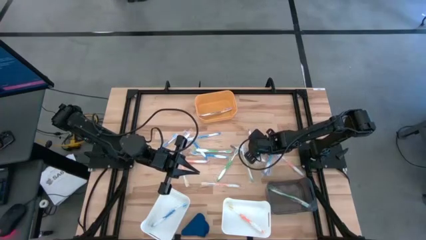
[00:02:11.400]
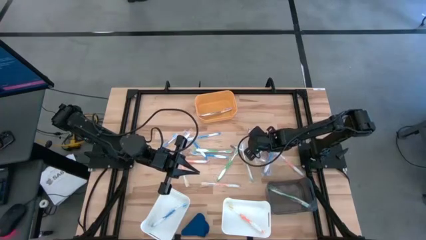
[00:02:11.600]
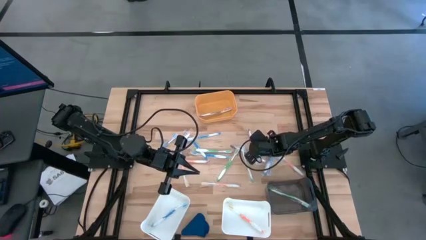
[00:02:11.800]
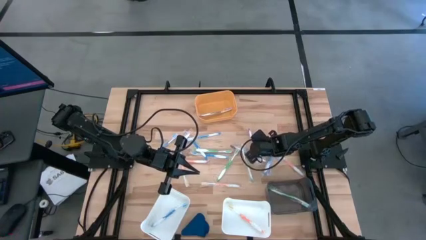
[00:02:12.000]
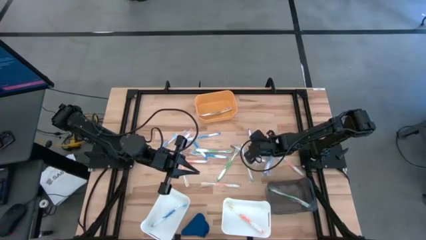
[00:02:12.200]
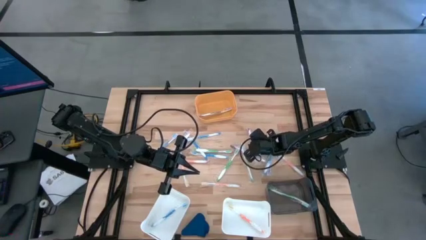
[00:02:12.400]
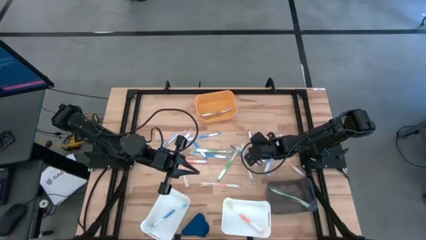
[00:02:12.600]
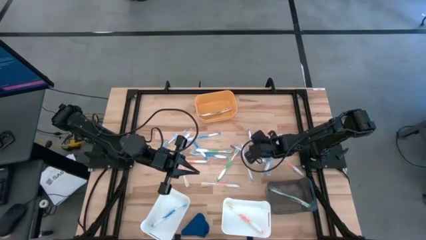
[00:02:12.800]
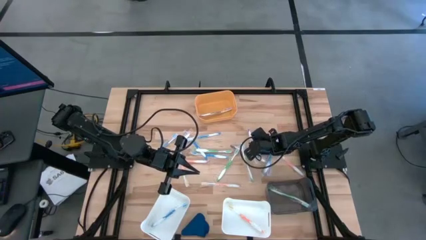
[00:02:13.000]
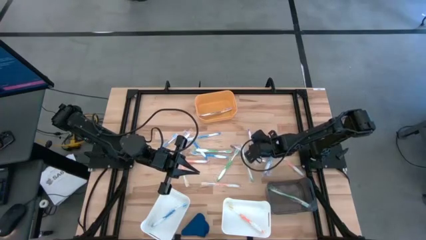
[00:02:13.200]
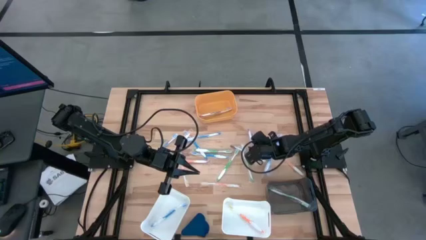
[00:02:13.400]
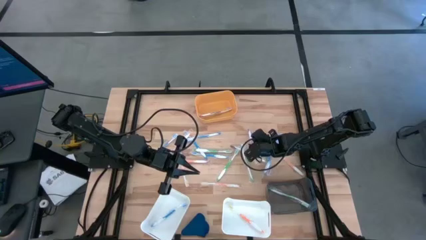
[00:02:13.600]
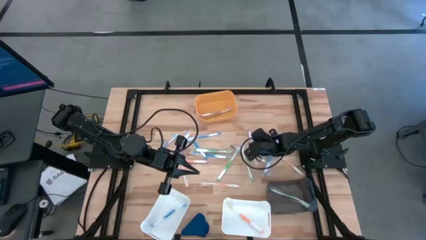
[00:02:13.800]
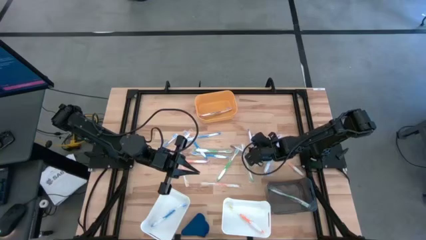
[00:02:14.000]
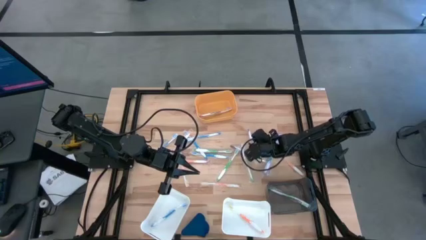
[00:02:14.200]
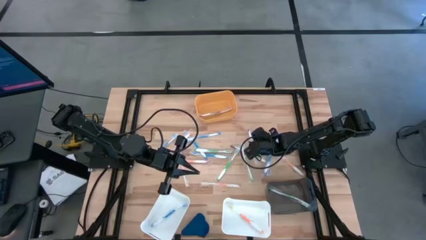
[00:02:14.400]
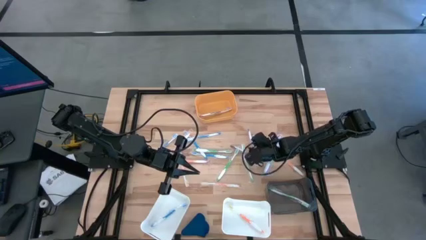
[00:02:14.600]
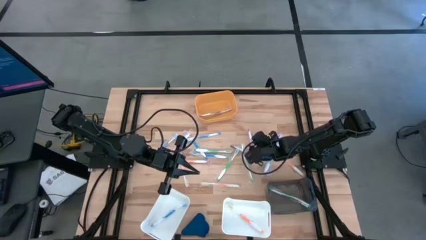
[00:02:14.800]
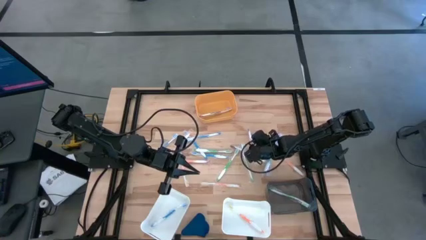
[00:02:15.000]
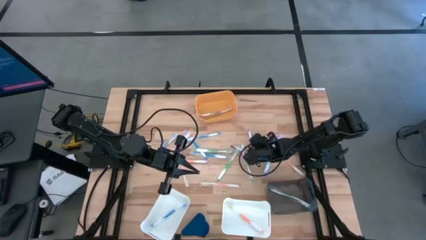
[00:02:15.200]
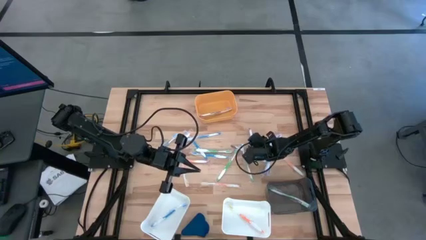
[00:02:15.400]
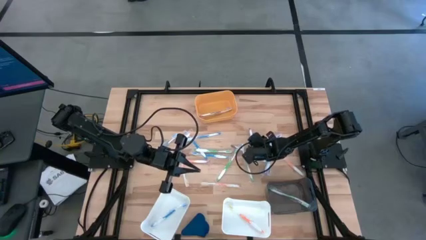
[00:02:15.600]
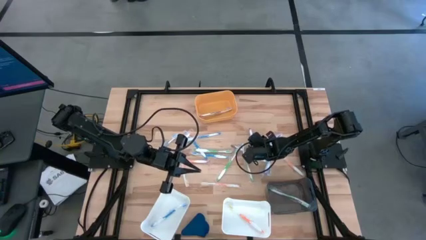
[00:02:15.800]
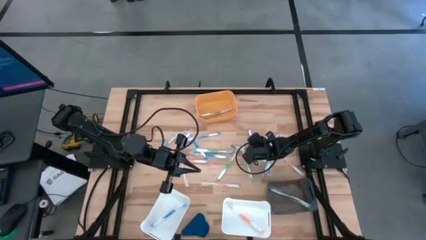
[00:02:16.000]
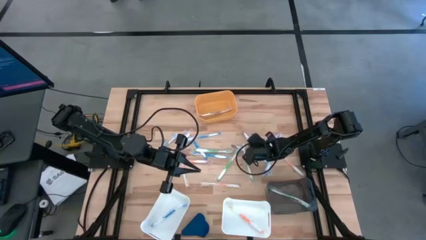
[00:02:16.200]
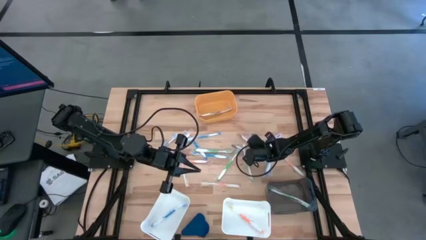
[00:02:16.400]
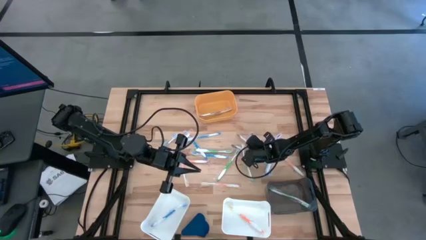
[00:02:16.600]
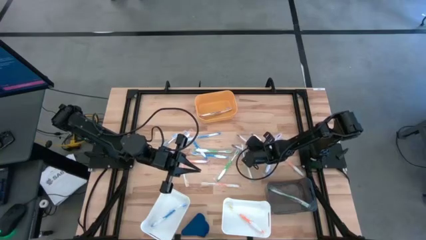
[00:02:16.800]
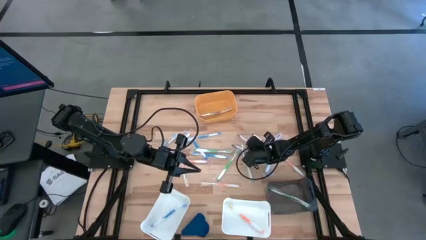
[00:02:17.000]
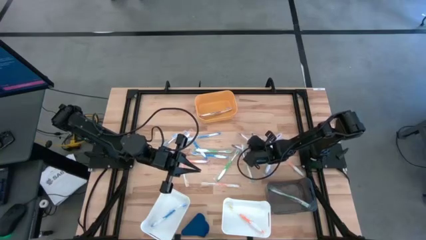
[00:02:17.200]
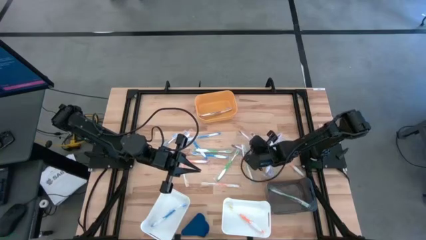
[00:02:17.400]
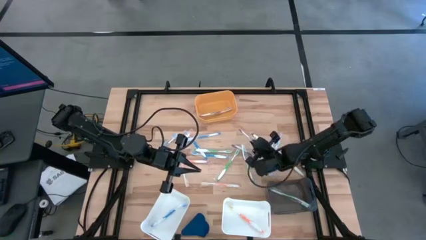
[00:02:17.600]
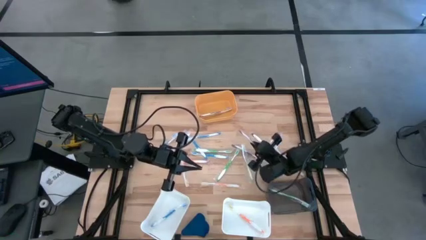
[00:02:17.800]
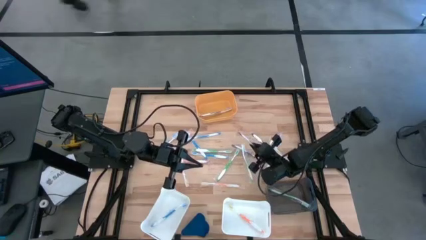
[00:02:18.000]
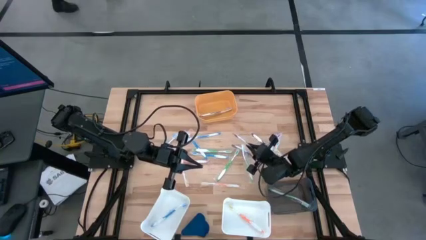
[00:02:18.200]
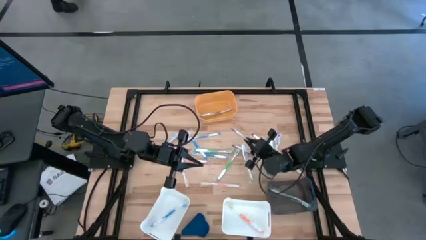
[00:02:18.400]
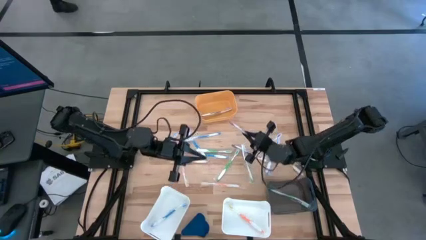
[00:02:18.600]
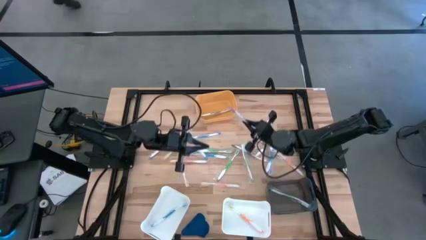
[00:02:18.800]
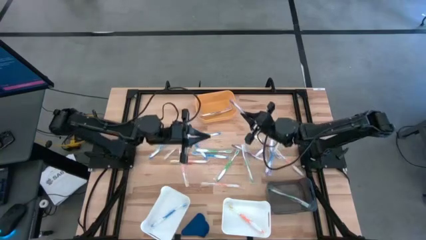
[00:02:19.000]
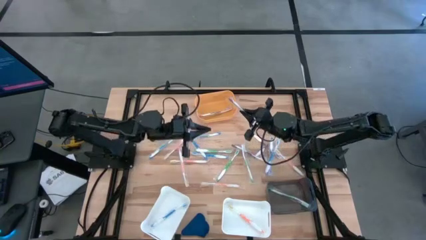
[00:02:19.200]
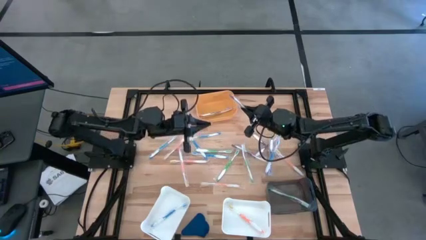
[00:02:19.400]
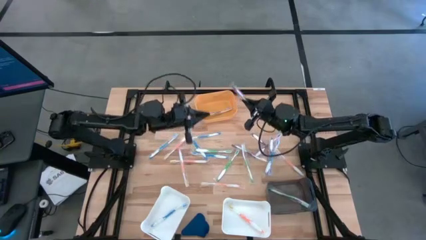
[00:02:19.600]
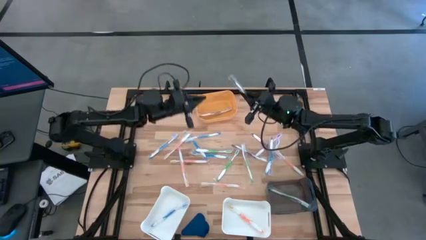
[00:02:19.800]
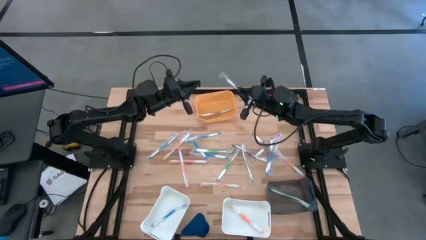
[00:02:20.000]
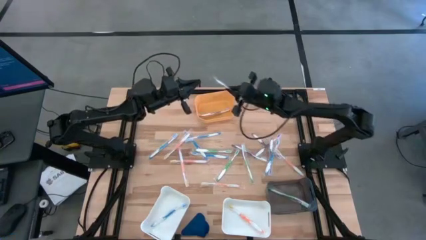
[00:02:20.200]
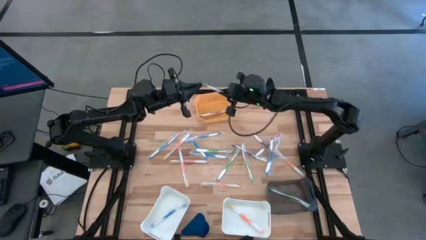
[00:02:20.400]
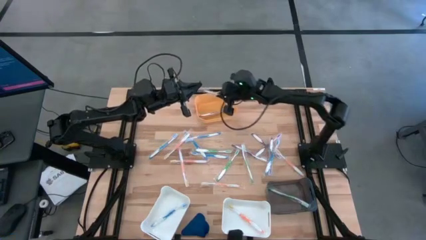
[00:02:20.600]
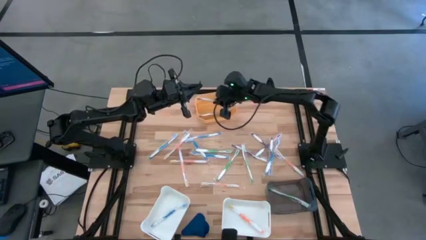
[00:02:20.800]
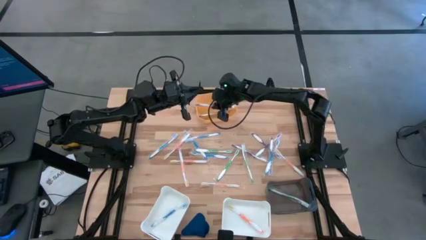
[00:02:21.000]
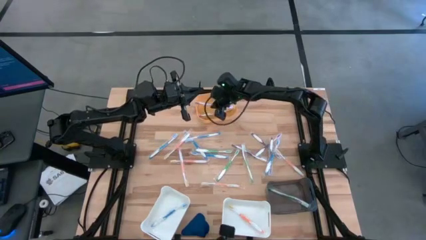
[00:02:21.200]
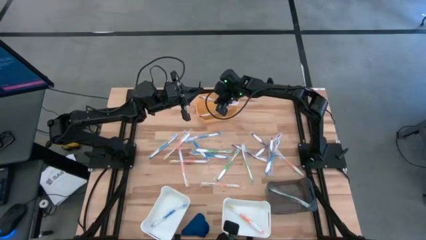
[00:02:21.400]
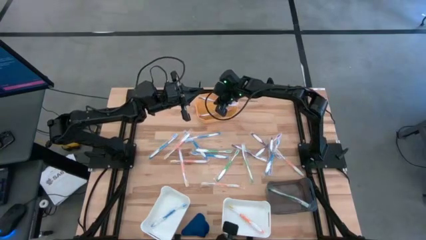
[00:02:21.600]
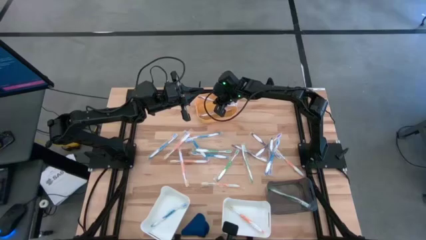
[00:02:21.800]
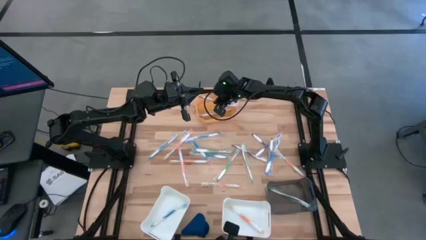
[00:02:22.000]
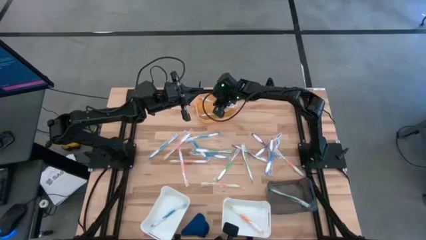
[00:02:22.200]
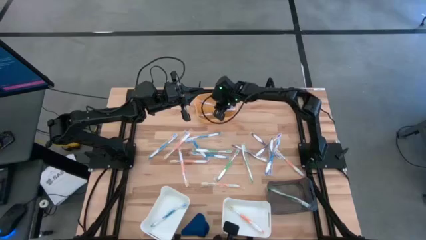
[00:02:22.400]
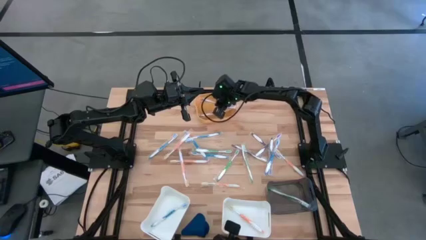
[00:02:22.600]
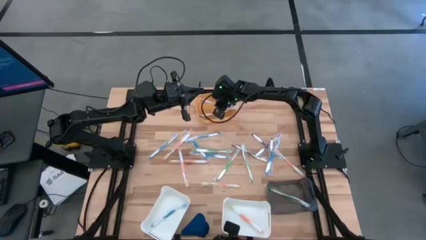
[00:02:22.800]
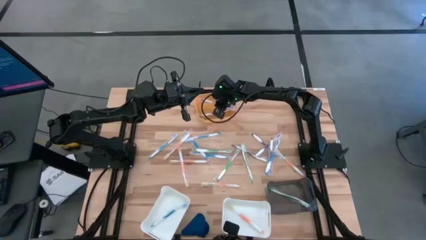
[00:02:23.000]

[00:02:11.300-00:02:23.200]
Task: Pick & Place Toothbrushes
Put the purple toothbrush into the yellow bin

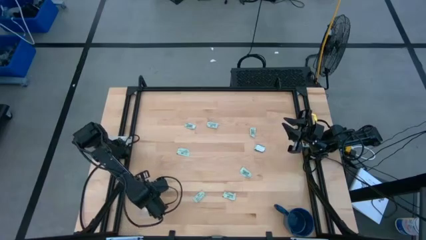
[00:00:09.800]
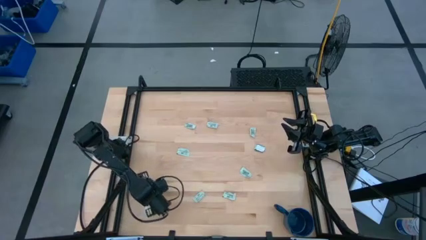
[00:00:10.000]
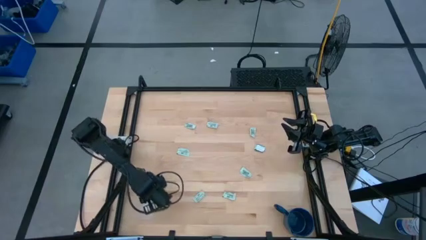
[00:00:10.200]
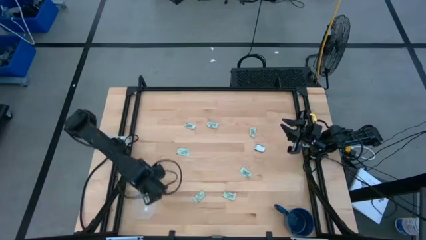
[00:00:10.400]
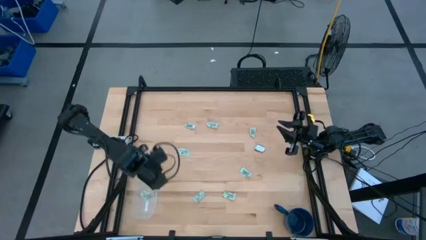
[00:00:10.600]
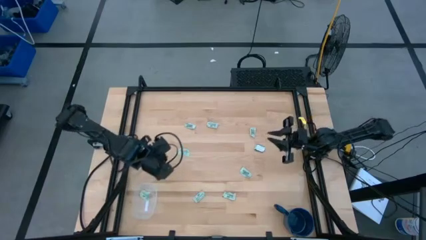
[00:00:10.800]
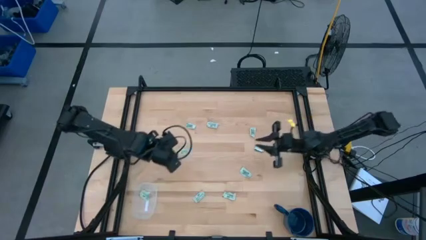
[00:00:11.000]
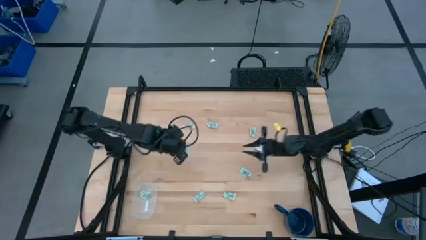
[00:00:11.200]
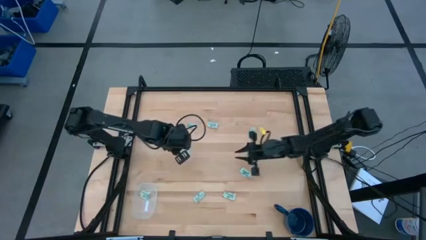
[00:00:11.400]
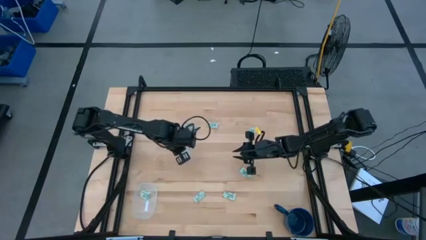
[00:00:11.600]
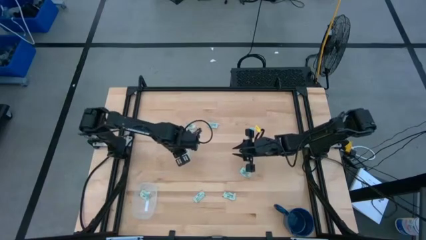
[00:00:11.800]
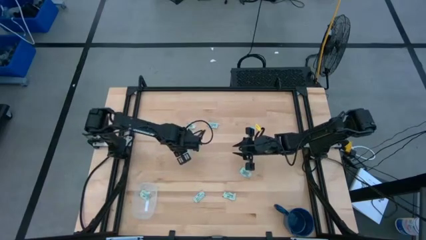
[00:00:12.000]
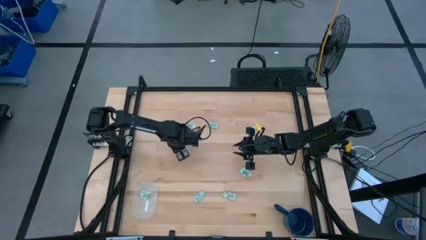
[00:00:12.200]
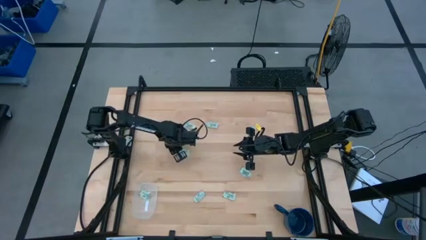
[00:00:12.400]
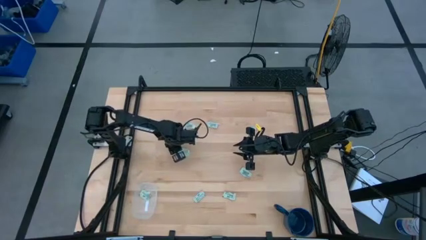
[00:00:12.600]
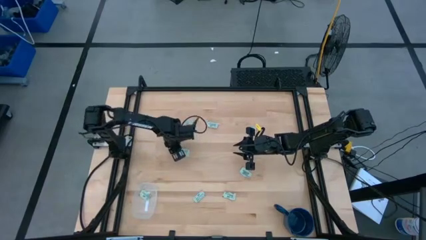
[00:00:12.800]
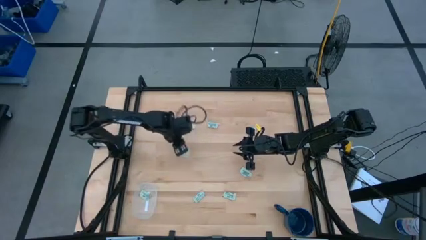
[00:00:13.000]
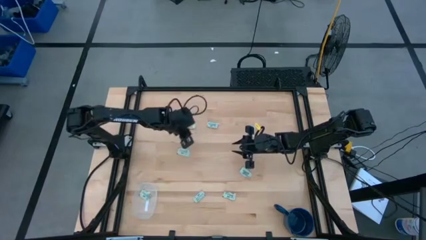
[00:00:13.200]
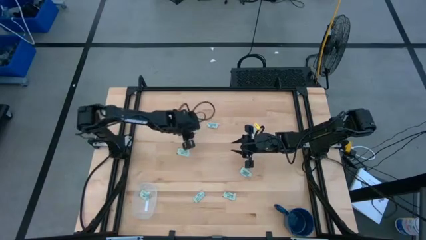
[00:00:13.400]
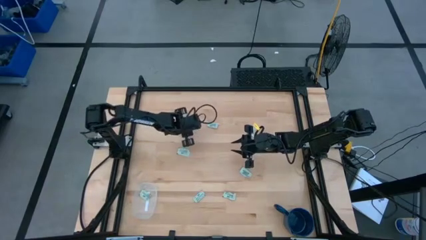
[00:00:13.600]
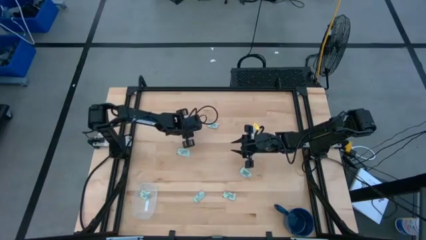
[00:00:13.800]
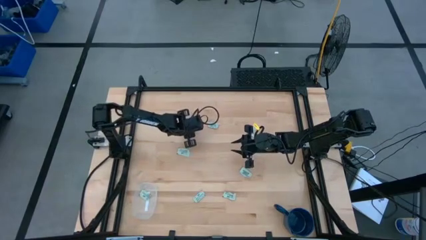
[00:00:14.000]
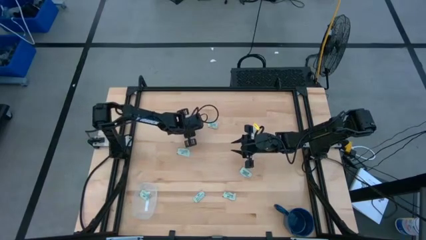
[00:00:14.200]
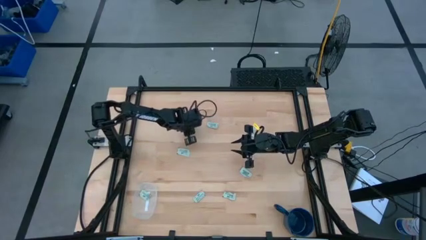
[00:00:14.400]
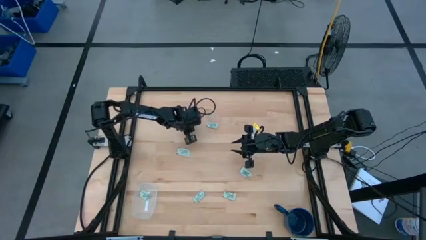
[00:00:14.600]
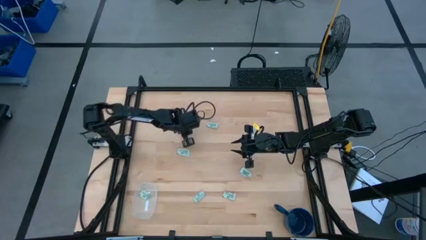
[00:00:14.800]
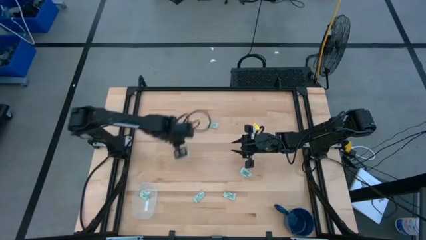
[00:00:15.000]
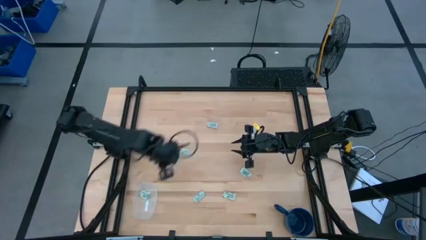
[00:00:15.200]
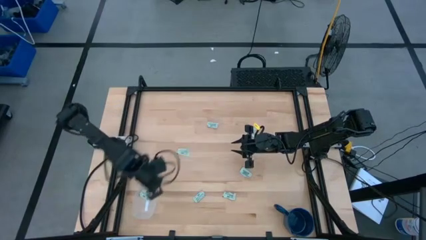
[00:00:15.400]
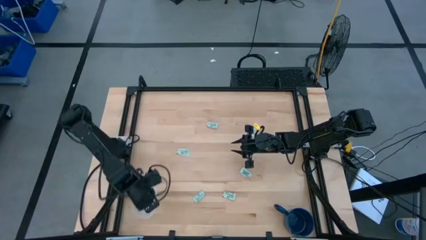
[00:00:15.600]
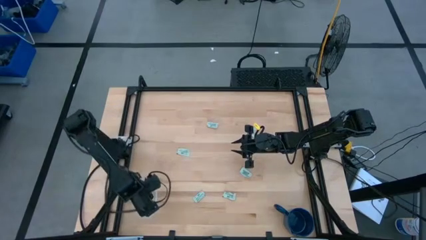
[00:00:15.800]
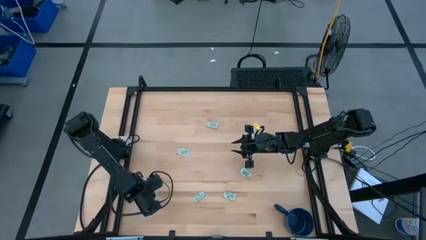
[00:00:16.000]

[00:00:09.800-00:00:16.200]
Task: Pick and place Stevia / Truvia into bins
Put the stevia packet into the transparent bin
